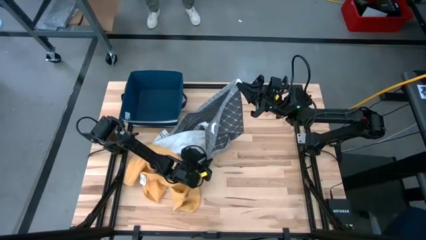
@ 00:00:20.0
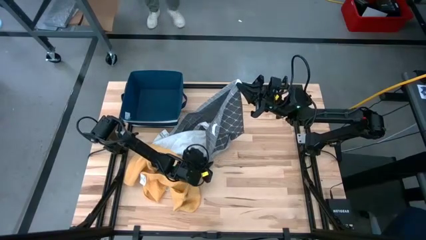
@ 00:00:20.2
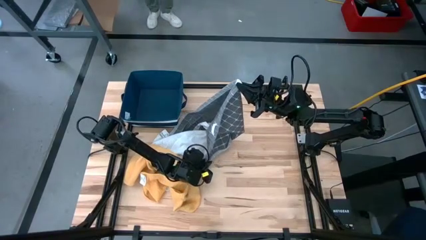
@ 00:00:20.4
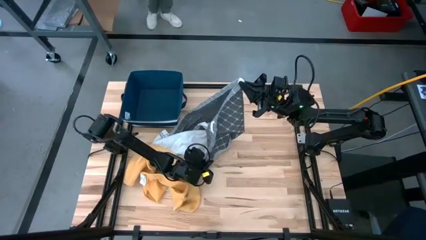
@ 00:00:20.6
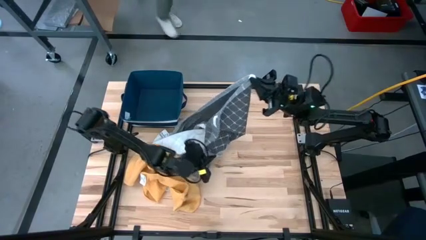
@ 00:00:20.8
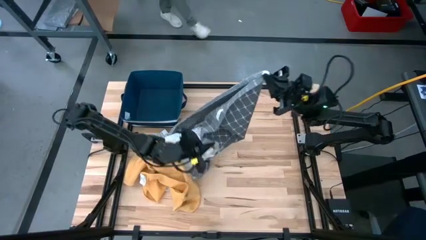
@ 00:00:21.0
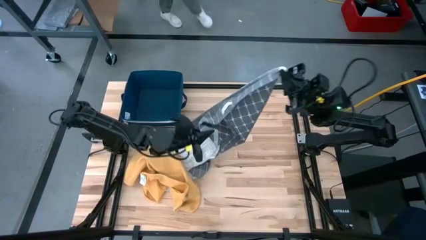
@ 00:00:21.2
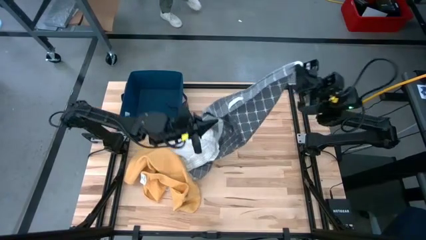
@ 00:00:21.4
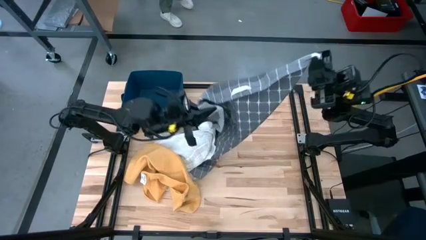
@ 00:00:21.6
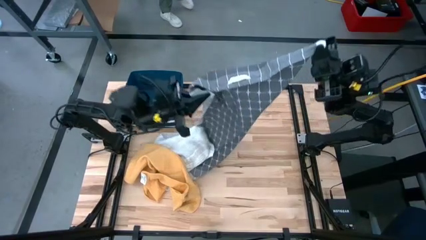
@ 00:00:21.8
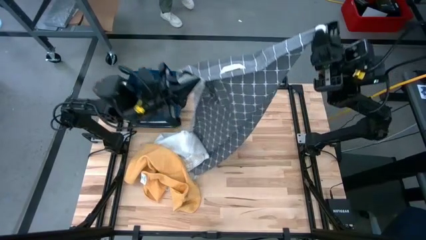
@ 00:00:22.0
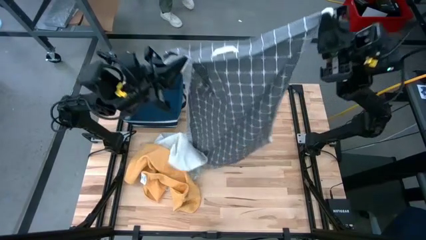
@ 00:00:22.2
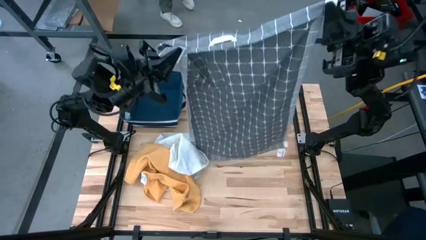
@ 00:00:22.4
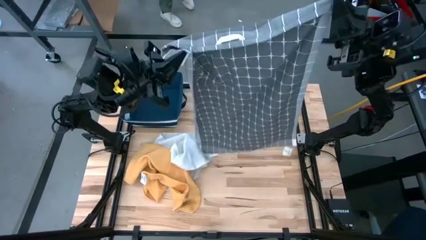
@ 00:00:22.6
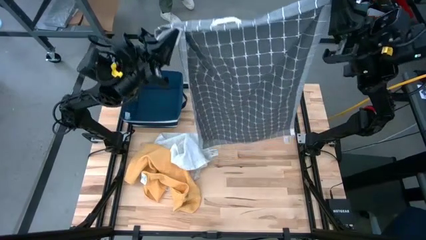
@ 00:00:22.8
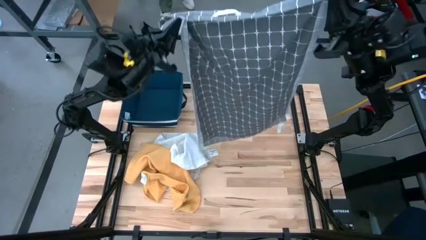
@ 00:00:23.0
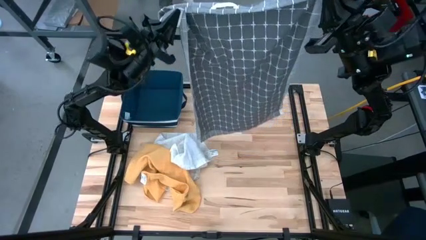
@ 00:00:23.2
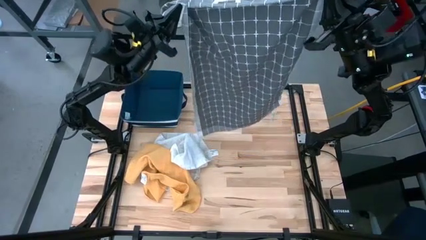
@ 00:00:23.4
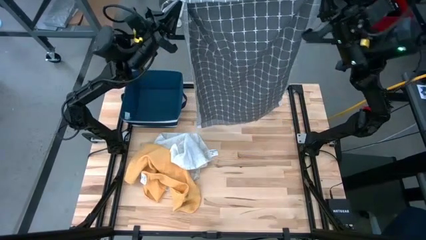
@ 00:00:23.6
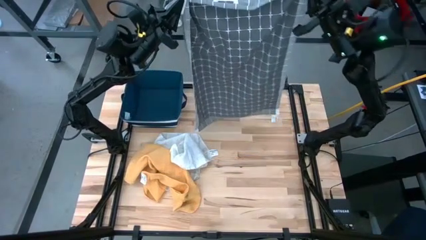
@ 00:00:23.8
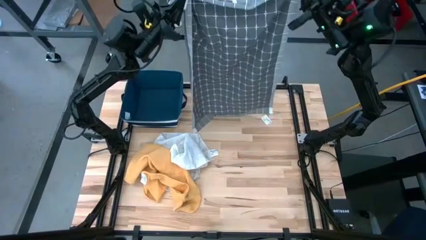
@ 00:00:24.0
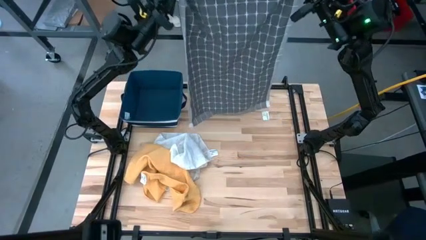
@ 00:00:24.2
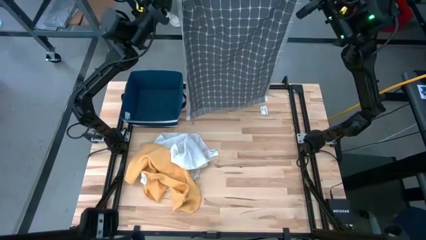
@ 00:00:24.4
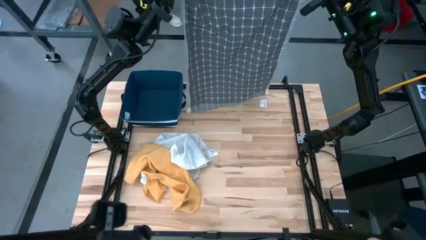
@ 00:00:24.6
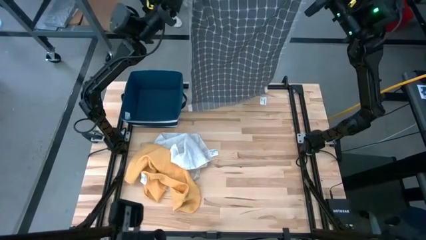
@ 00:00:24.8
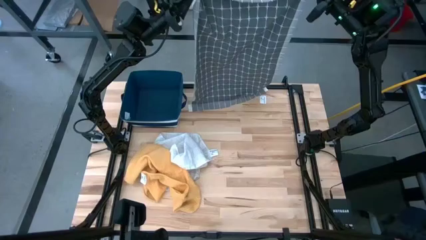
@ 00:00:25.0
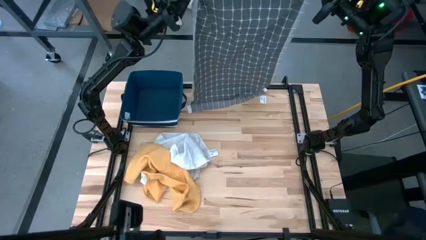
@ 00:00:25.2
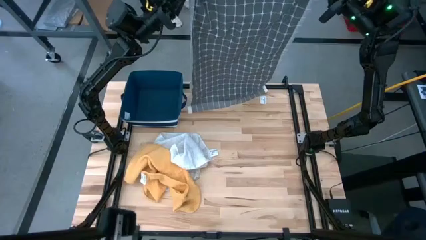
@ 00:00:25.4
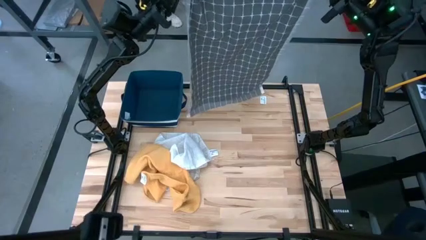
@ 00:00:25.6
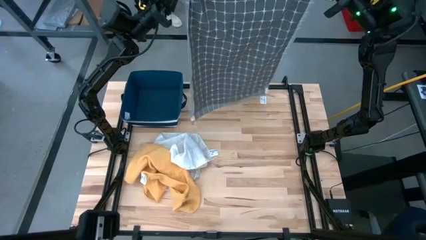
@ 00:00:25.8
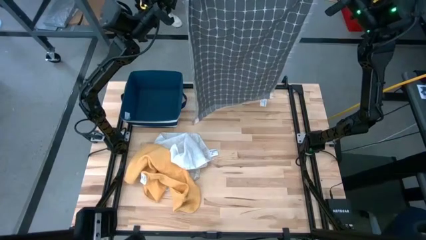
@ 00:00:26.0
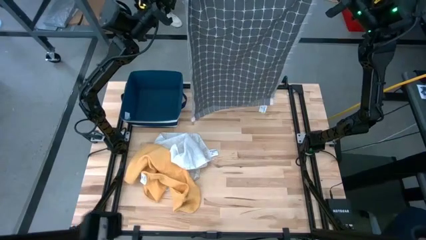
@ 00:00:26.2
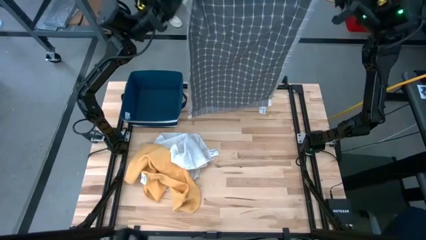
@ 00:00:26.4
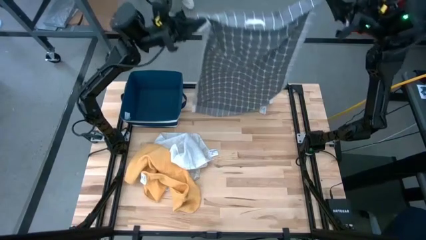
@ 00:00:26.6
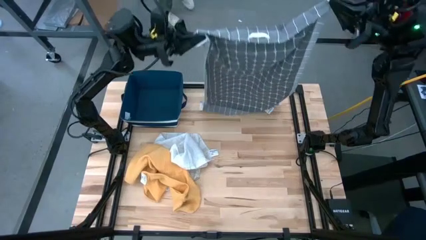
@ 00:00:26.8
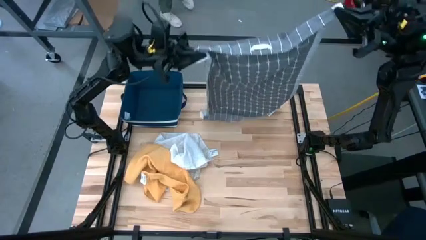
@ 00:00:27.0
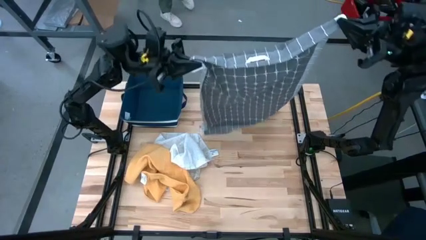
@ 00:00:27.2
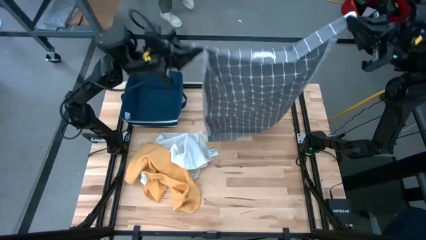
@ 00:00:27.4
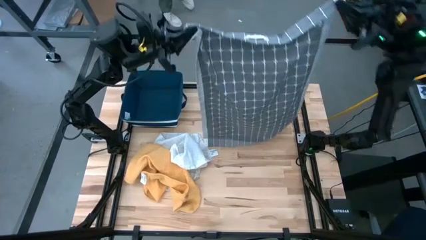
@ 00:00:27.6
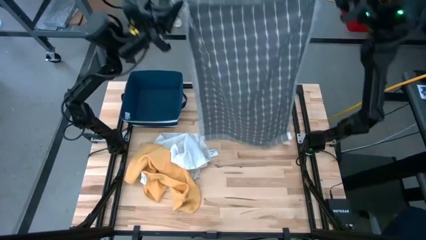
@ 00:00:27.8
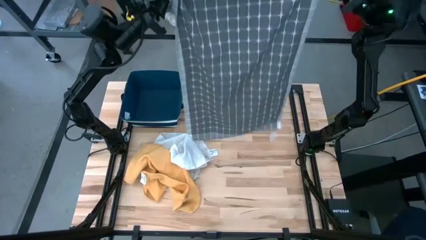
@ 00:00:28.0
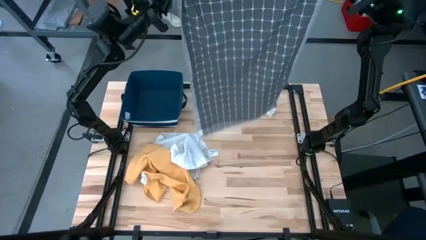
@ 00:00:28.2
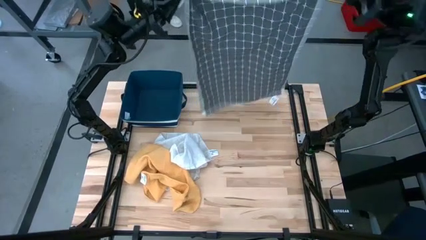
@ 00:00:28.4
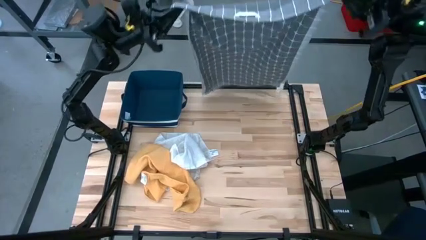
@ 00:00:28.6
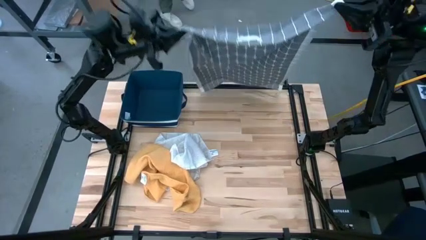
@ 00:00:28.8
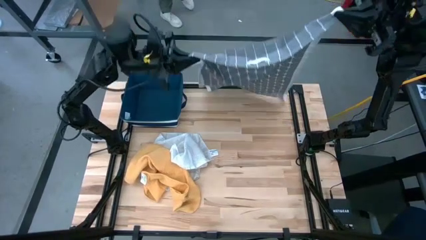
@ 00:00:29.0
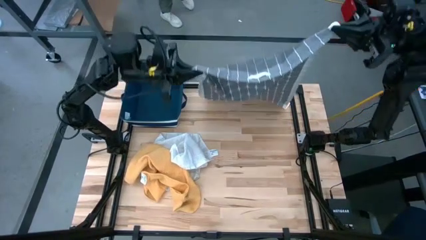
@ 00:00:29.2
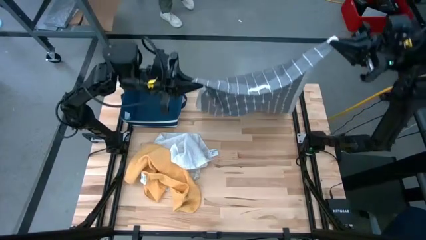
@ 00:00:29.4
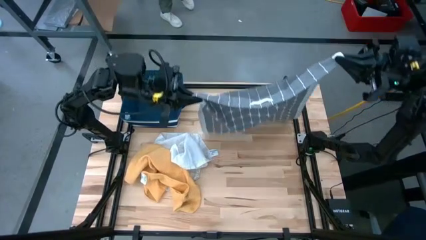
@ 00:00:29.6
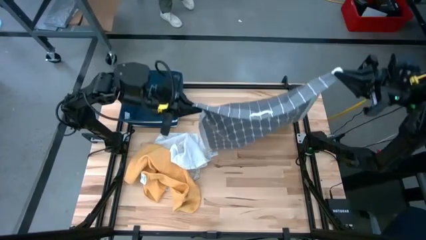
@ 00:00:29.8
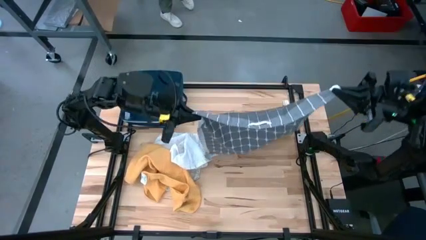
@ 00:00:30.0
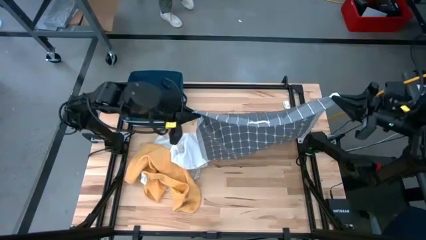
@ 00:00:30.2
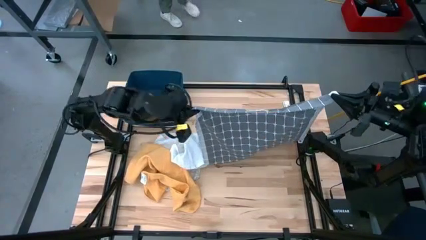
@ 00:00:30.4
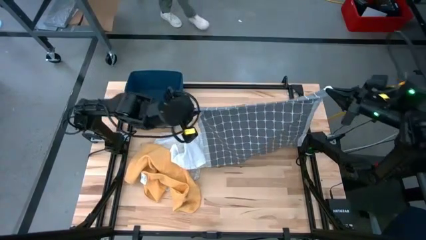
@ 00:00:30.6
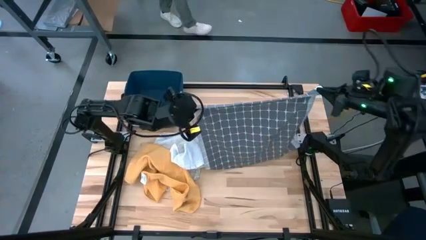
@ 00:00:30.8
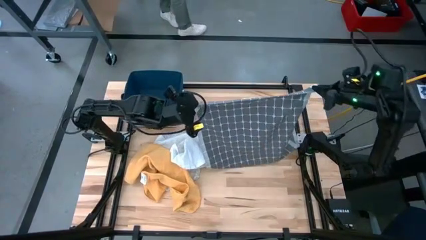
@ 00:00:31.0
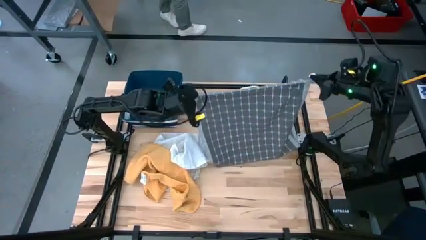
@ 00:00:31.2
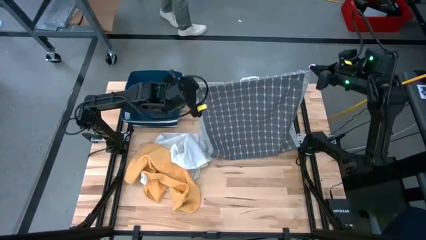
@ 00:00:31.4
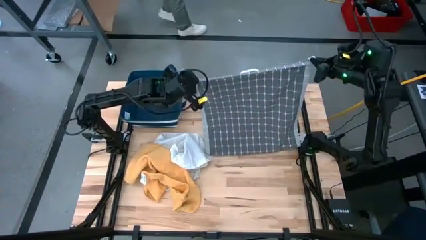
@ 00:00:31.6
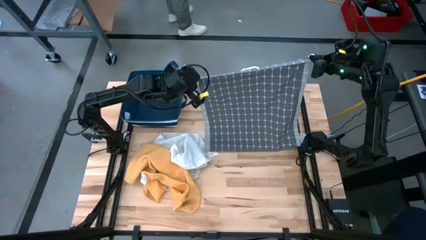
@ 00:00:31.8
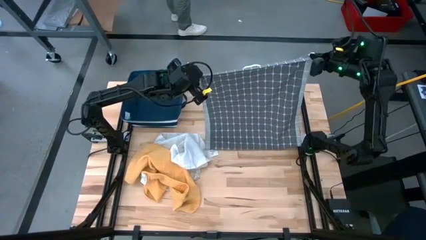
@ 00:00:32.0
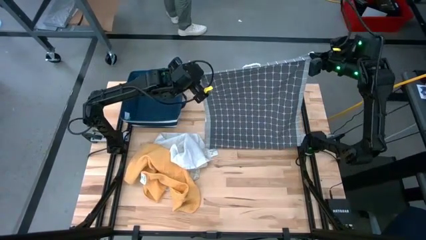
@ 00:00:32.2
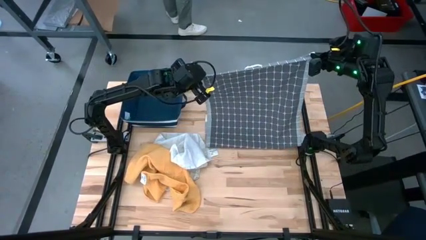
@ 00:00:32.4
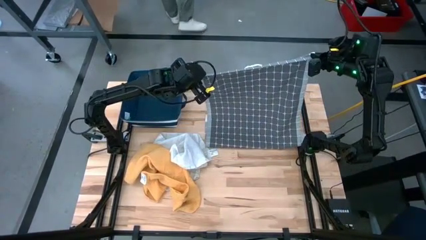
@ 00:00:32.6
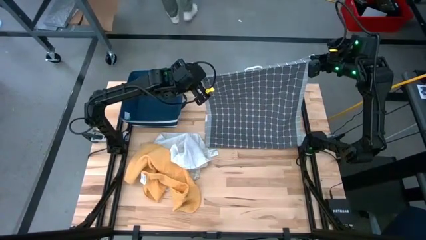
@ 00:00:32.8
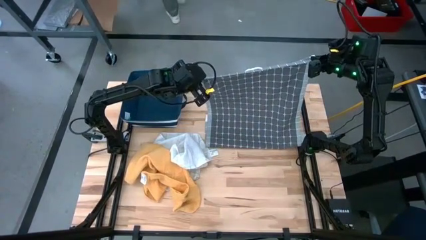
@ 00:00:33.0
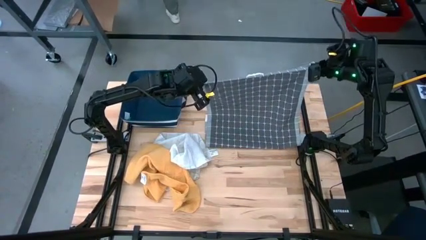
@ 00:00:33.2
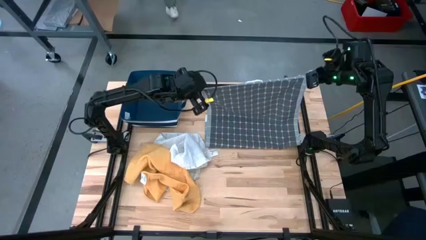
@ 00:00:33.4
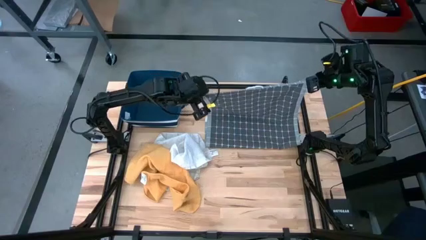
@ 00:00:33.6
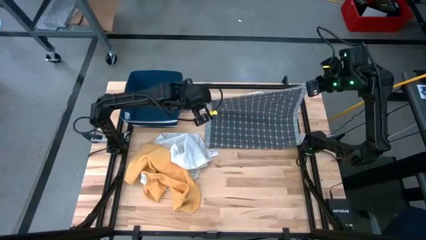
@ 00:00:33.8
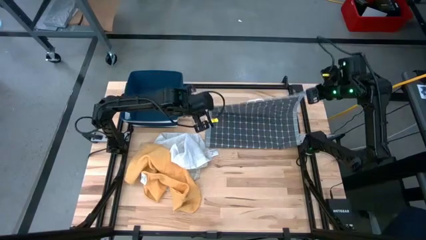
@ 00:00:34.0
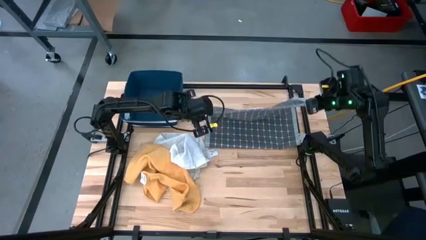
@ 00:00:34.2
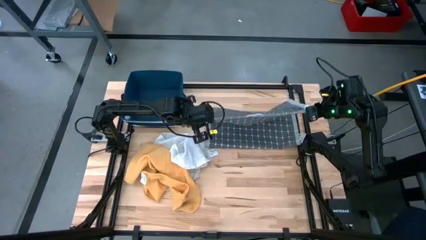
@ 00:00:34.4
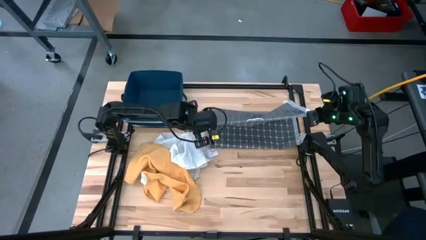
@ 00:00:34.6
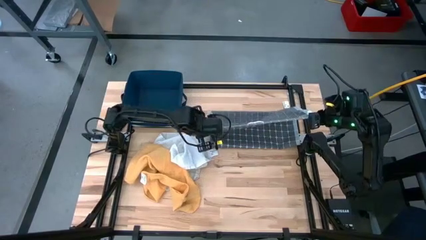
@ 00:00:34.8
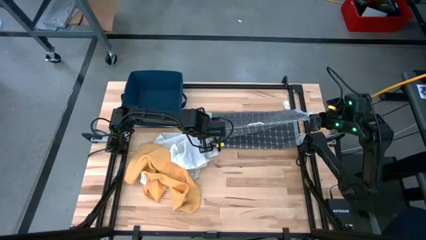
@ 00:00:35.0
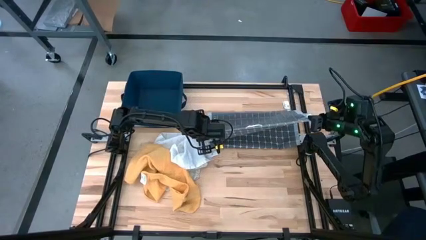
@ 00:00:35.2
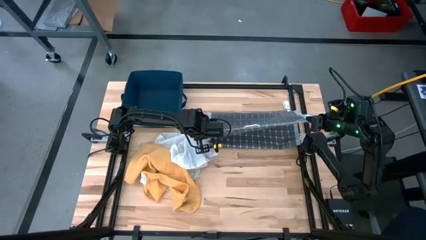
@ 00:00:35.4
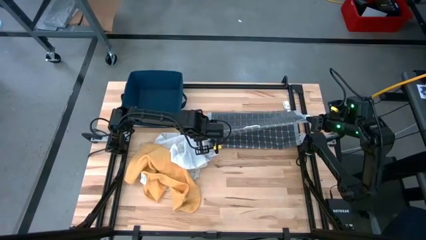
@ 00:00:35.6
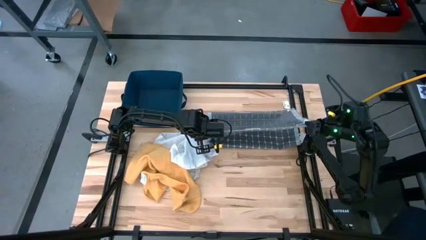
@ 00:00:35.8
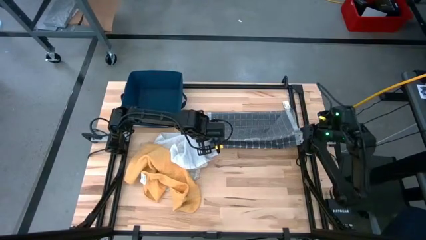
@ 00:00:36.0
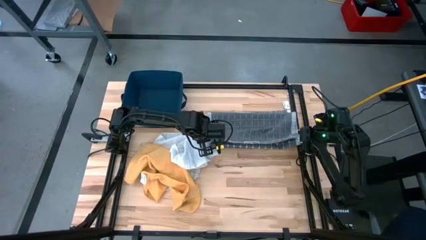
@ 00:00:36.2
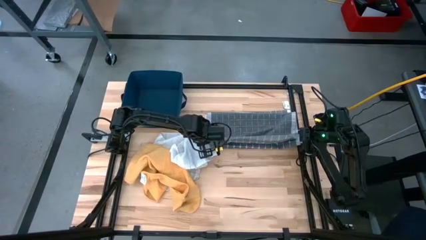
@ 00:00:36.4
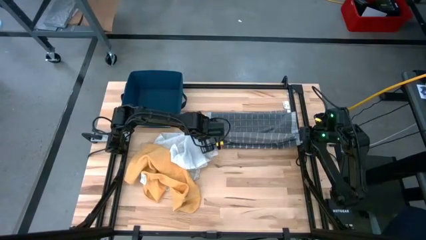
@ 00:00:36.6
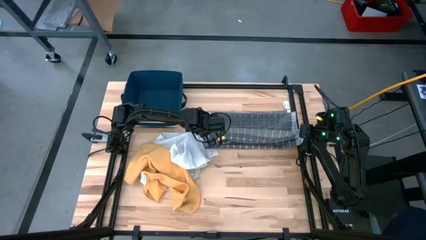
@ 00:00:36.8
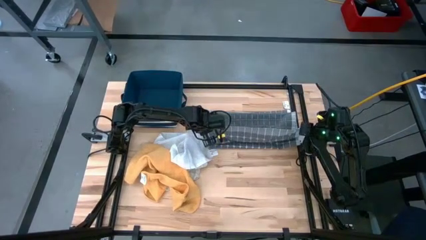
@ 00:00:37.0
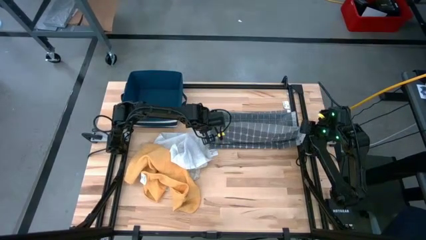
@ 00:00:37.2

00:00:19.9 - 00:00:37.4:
Task: Fold towel
Fold the gray towel
